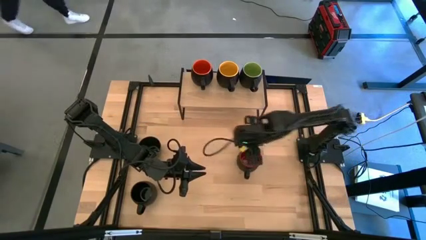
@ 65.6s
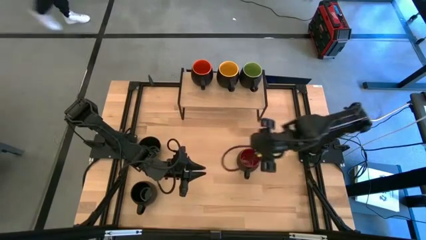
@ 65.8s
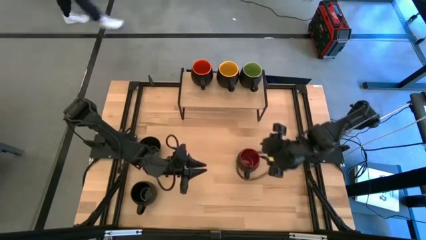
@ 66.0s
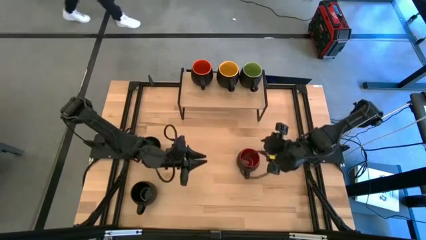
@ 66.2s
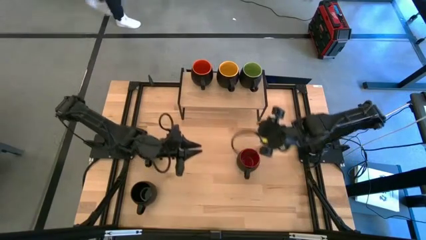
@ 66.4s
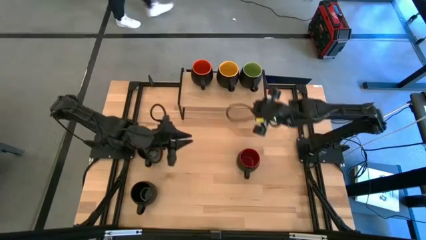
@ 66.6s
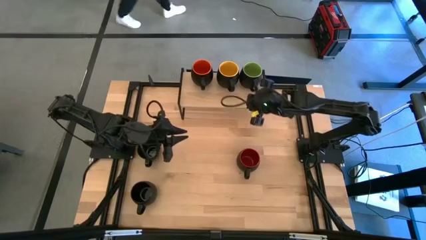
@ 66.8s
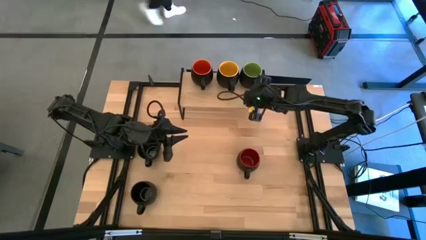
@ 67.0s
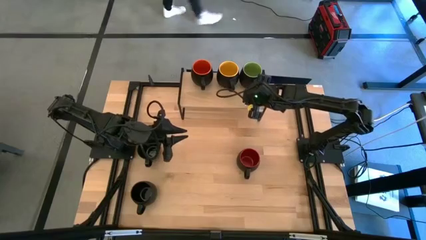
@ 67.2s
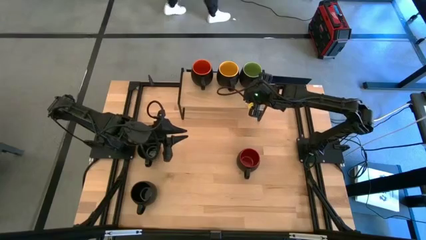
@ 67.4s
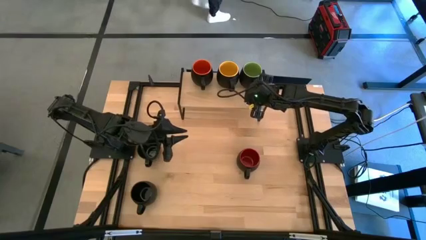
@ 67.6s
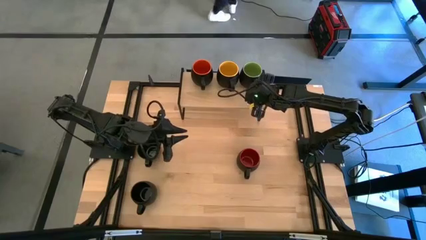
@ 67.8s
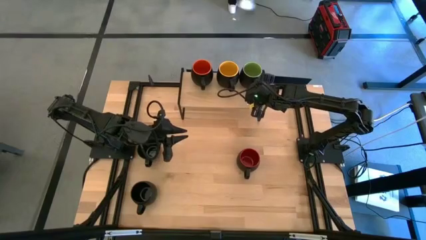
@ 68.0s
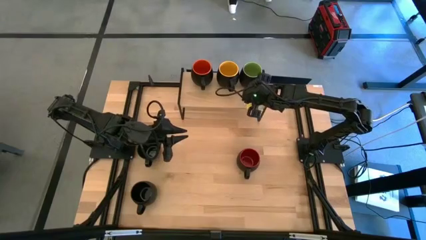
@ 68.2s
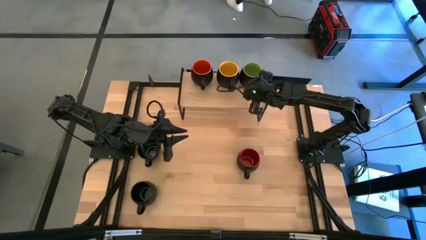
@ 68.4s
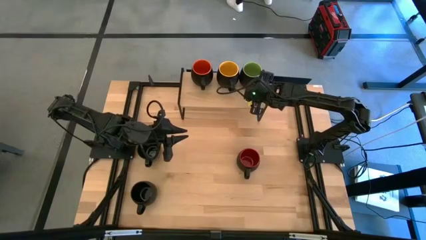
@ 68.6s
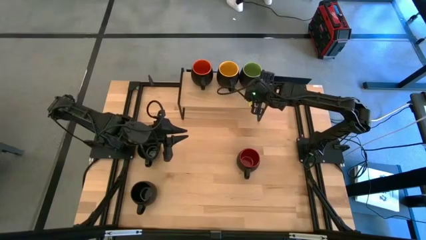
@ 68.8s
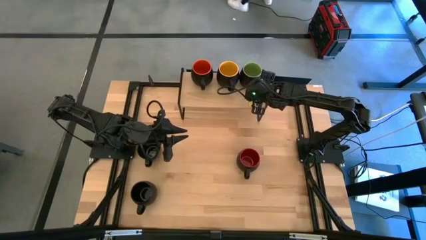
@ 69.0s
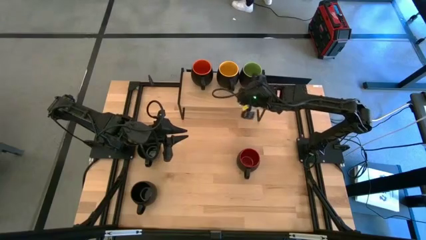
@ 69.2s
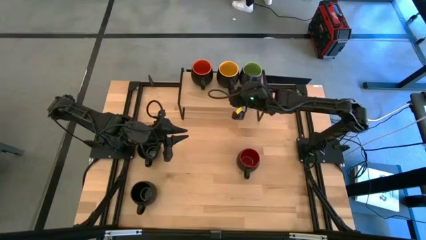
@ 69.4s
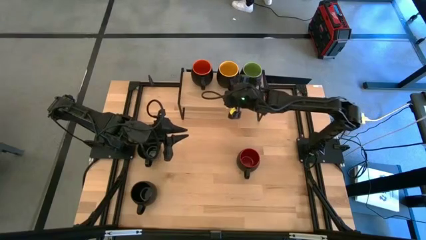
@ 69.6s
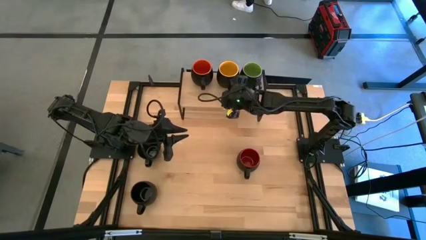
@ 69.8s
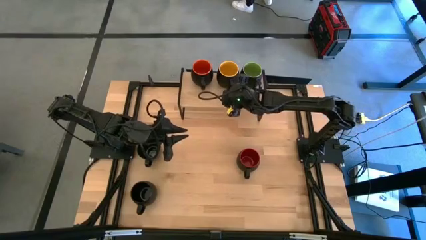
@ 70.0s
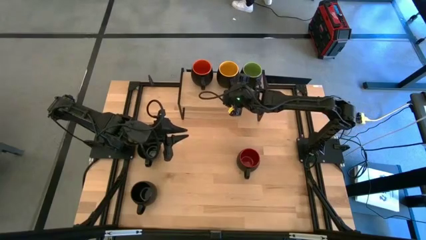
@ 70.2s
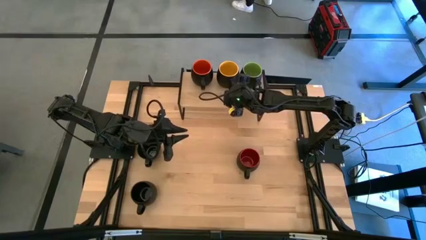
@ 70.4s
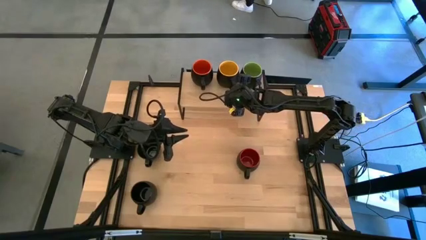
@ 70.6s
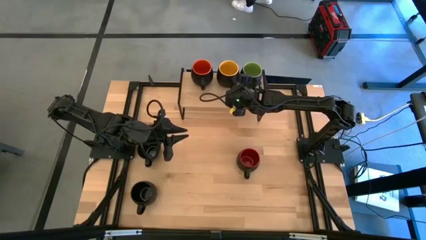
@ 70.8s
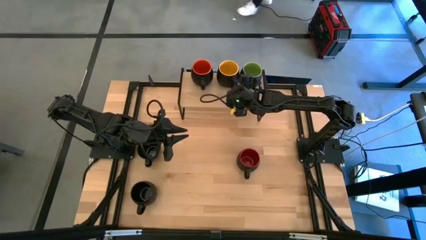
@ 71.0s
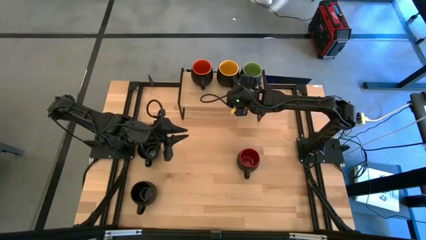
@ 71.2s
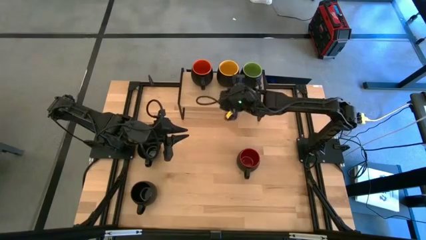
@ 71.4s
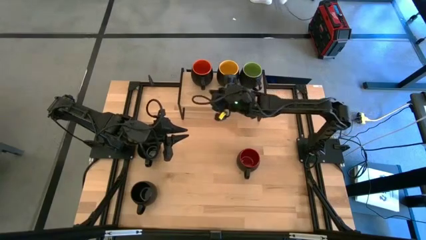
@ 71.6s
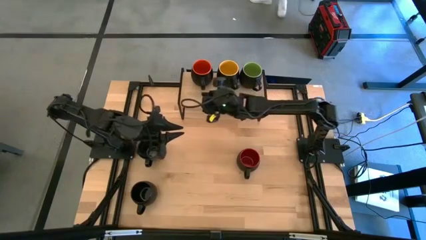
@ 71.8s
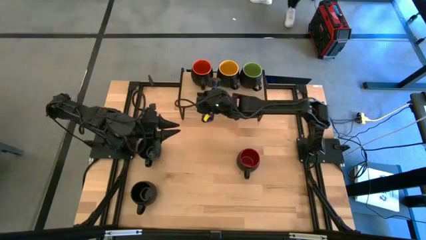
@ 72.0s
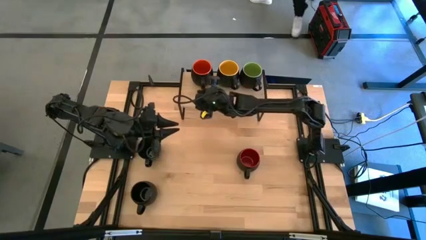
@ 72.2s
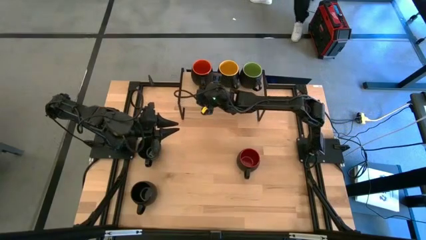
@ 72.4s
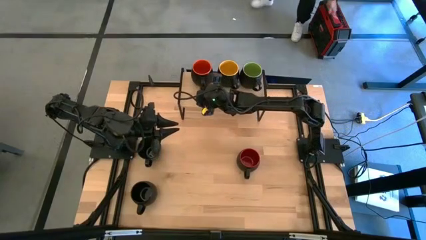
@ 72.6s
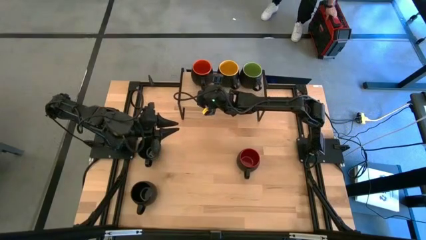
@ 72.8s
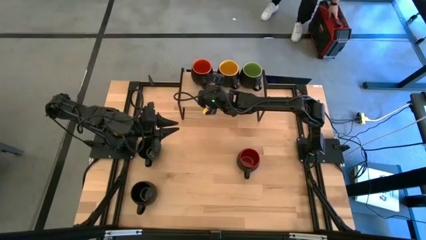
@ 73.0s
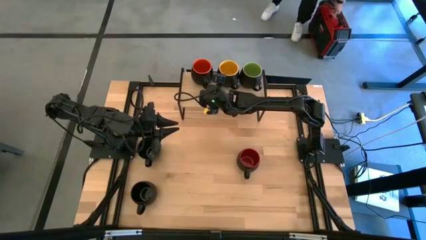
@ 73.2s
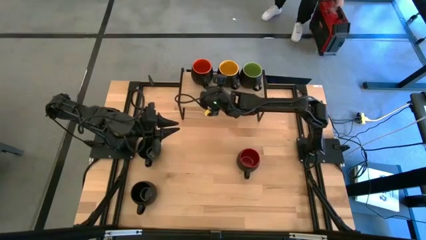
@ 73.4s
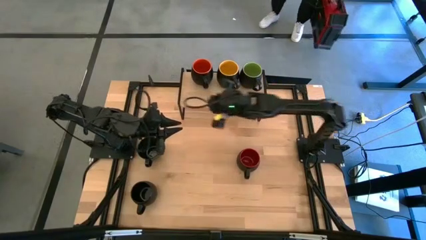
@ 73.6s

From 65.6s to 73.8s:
Task: Place coffee mugs
Adjust the mugs on the shelf

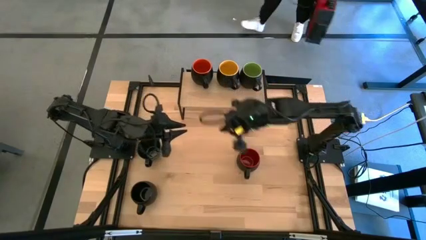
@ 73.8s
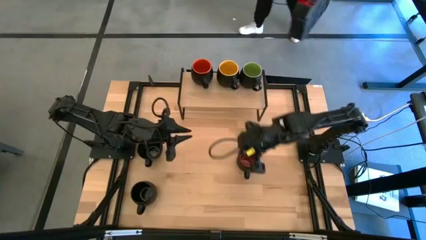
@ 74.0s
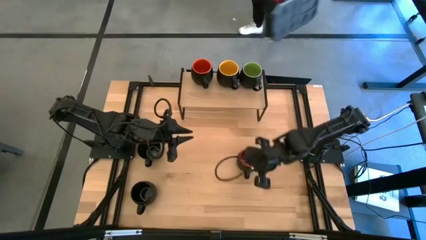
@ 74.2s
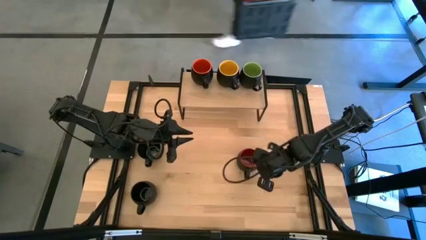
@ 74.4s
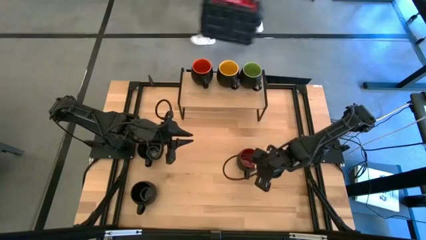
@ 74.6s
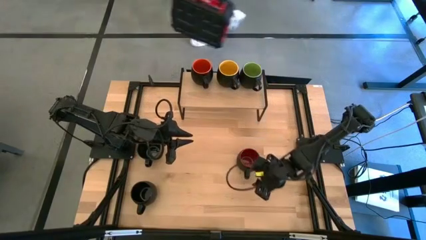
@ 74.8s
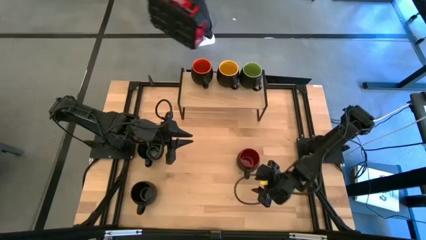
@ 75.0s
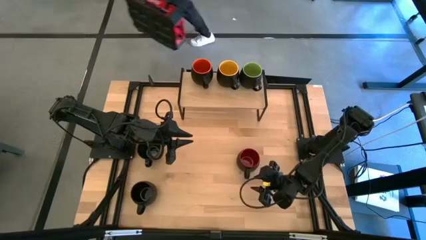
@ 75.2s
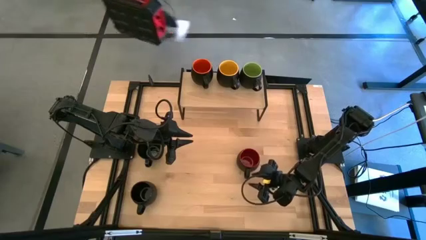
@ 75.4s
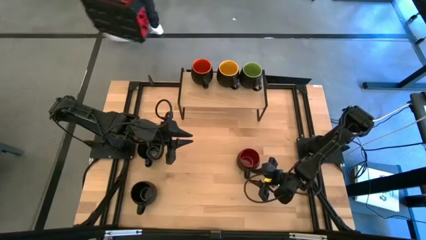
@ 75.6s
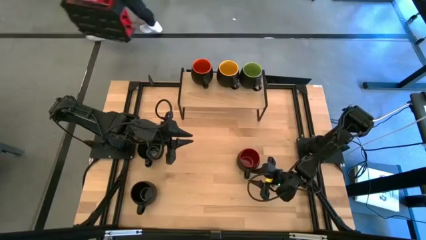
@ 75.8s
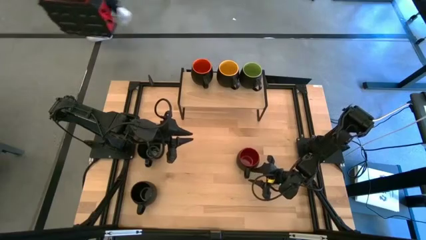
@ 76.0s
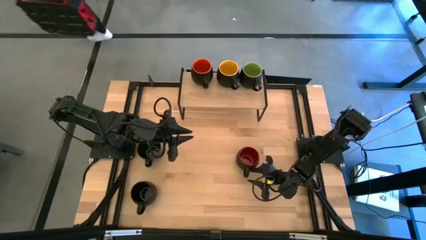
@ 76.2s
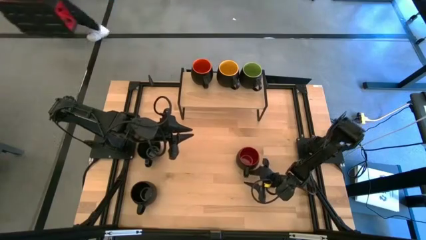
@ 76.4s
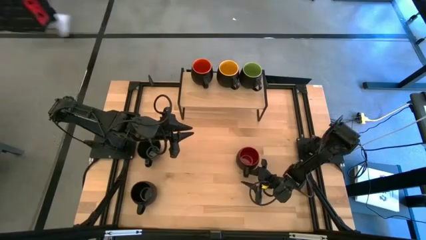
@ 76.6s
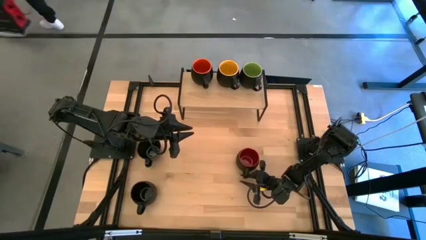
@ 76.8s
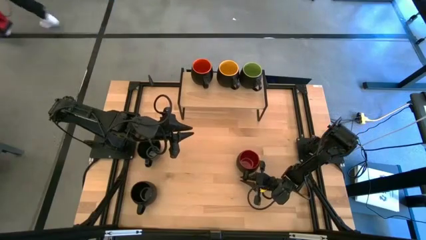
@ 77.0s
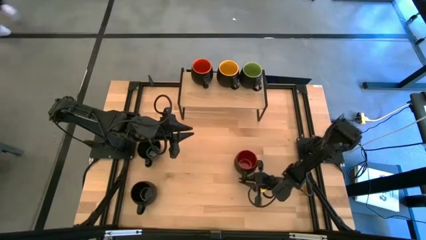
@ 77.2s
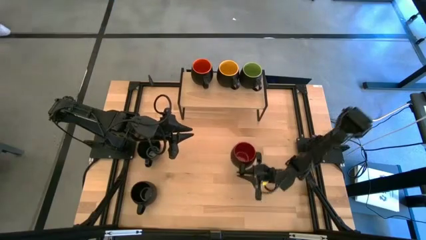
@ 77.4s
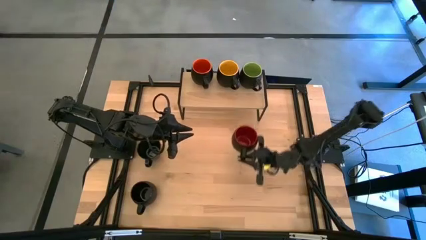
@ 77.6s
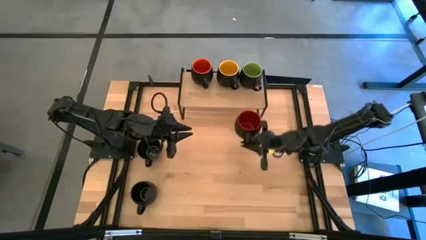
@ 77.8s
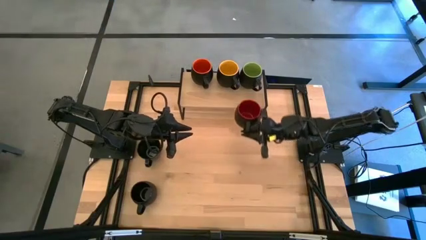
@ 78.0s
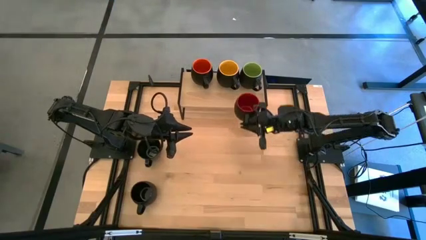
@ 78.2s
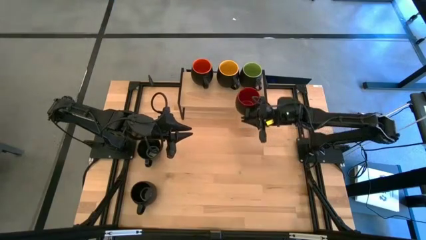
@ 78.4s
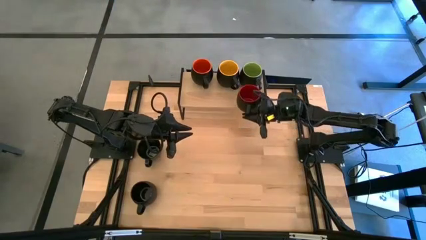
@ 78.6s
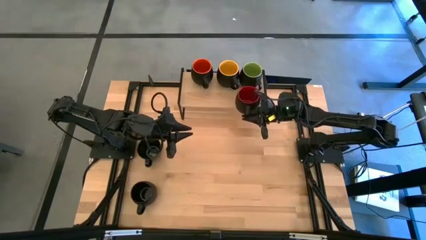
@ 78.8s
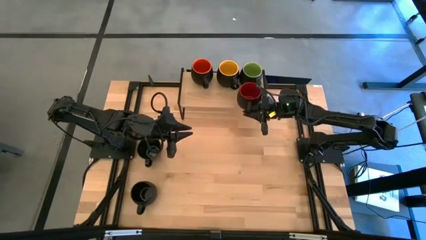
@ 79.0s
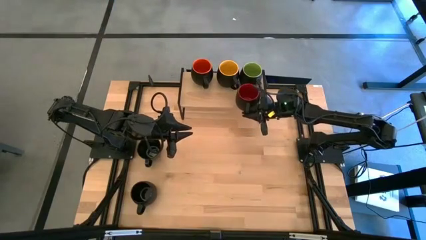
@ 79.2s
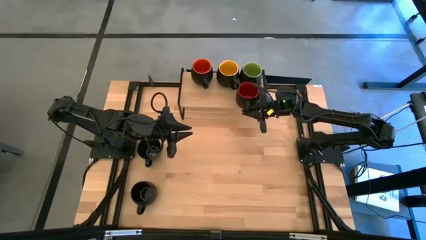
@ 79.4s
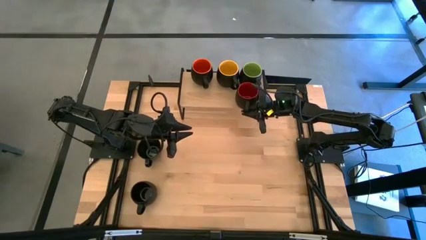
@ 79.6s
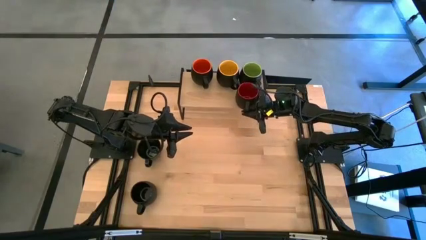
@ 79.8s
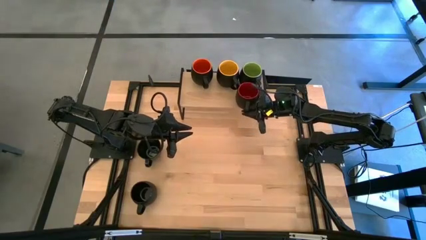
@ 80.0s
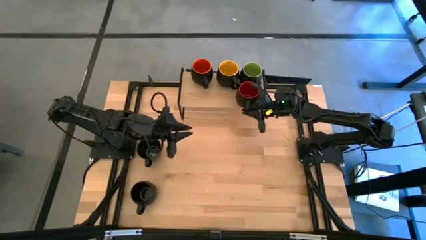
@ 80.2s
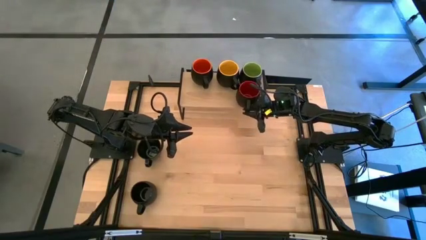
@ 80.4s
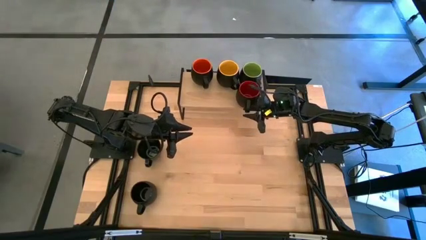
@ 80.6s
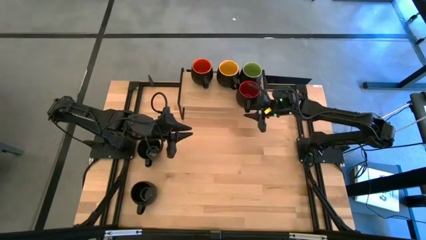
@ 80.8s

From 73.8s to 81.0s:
Put the red mug on the shelf

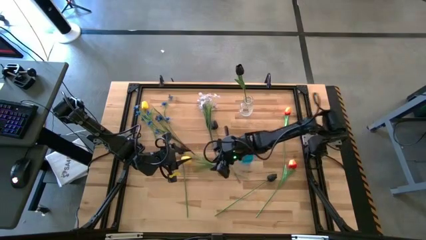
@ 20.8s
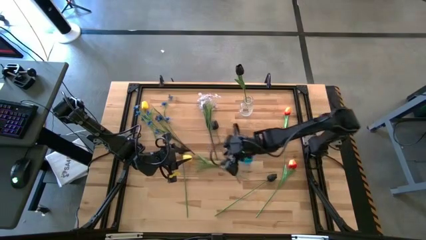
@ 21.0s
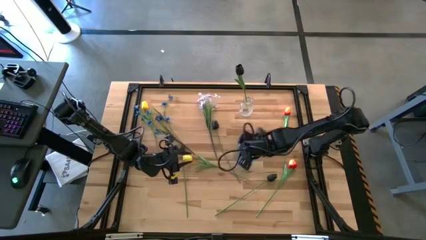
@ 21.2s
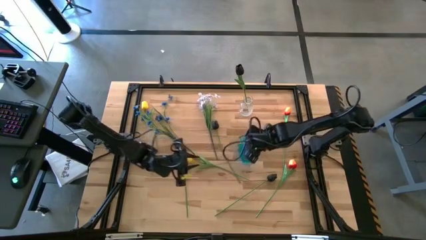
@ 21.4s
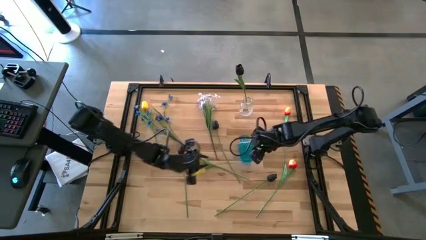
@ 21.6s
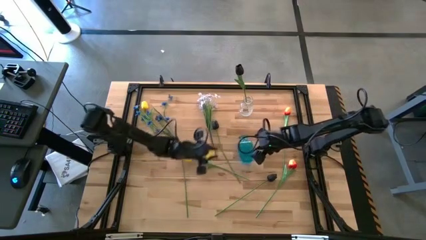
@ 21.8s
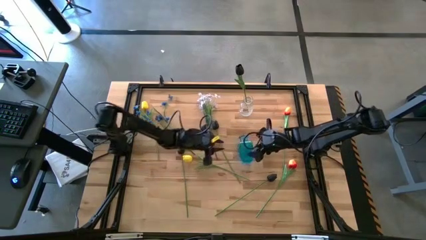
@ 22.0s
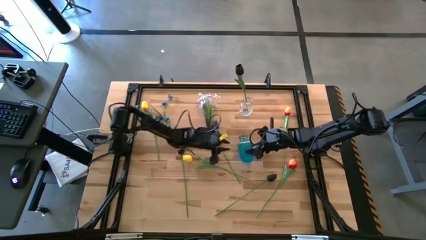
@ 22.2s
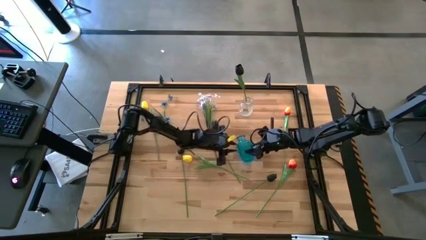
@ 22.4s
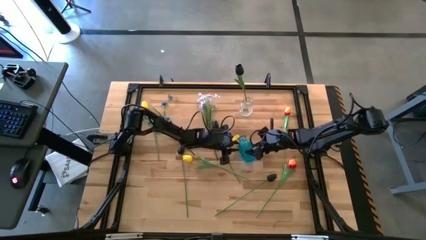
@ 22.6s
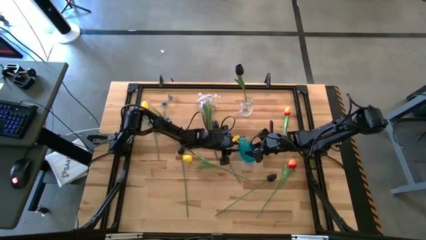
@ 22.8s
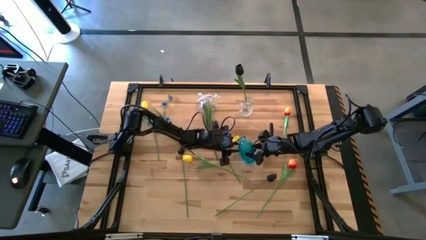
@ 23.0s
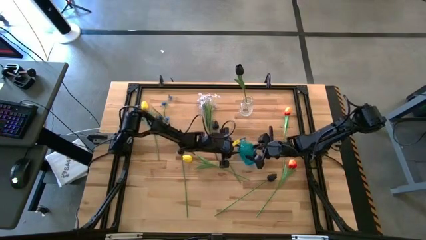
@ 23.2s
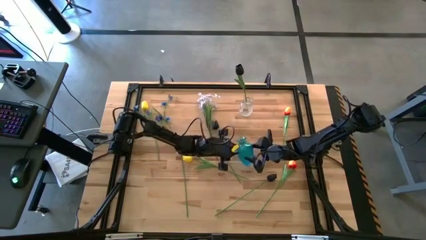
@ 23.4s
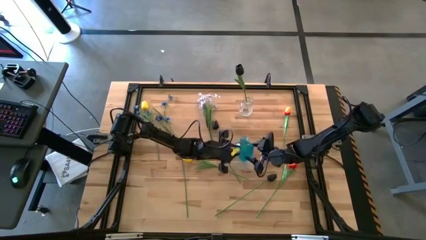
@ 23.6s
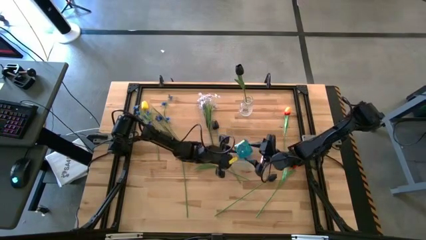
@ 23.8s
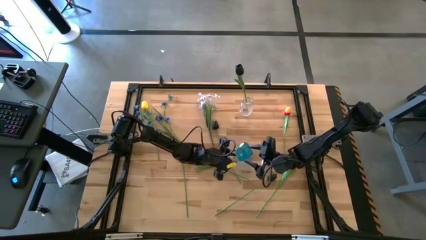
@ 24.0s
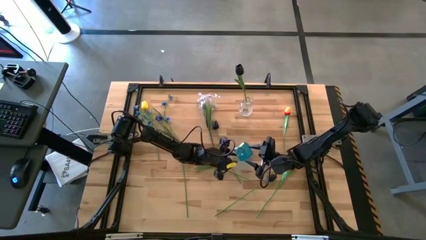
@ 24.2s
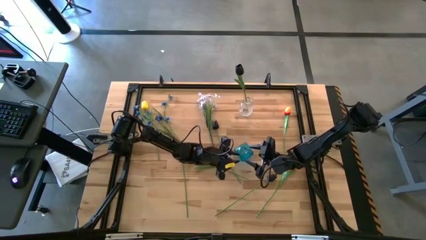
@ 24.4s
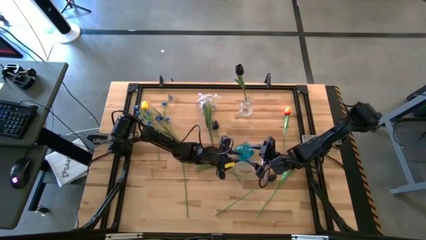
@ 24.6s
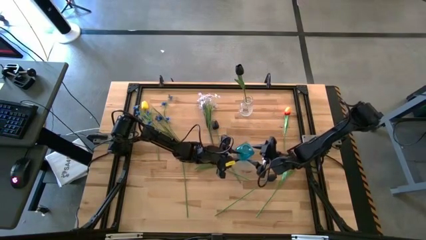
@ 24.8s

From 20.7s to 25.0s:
Task: Sort flowers into vase by color
Adjust the blue flower vase
